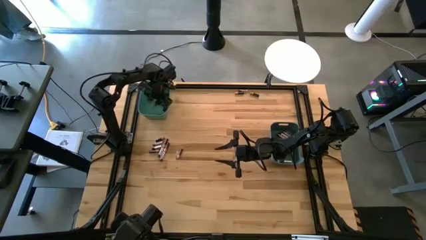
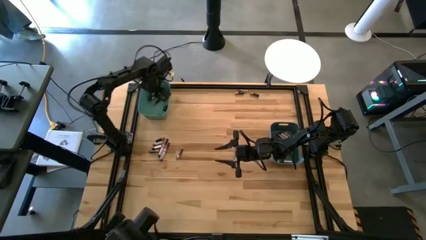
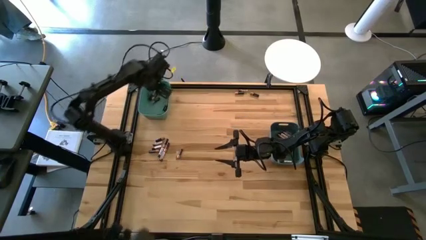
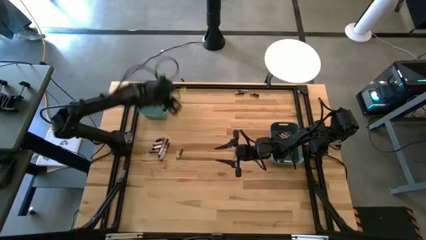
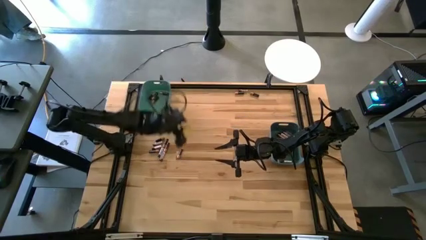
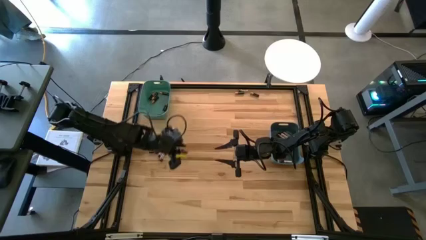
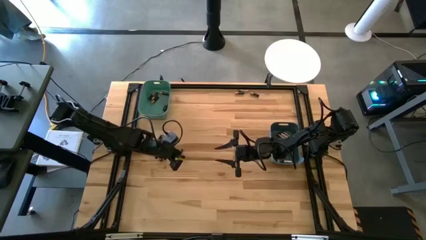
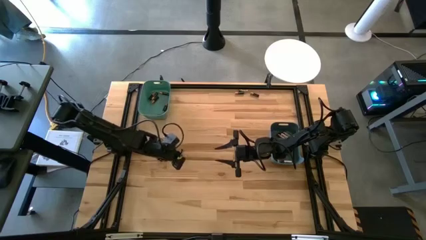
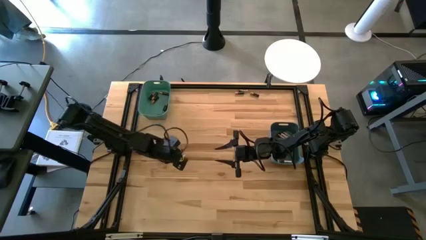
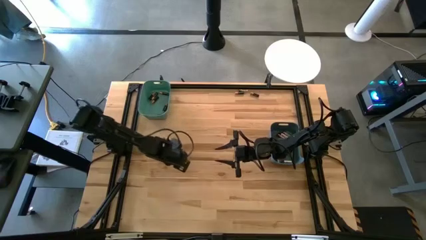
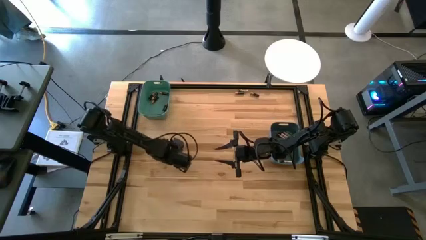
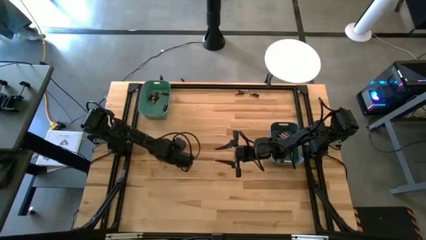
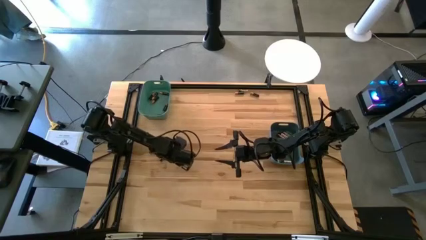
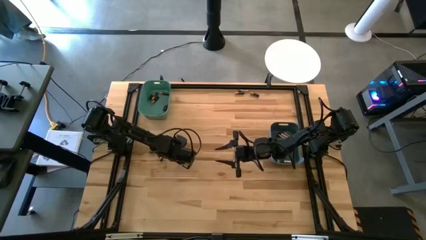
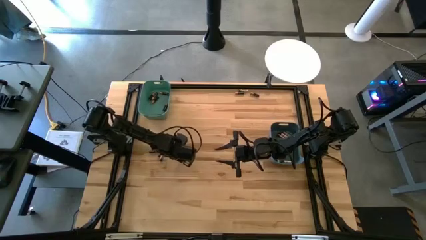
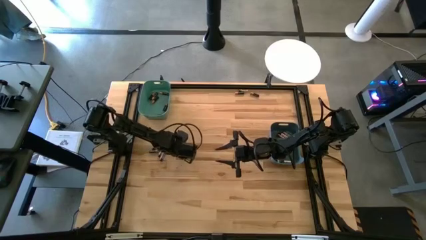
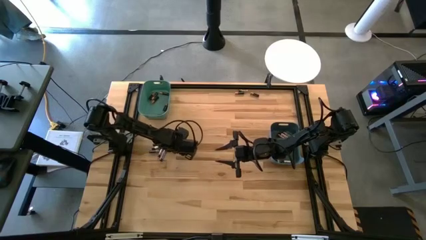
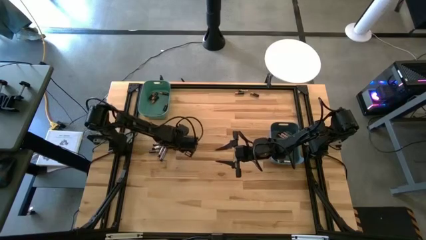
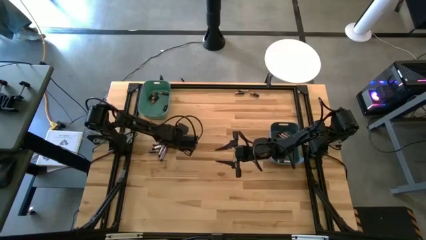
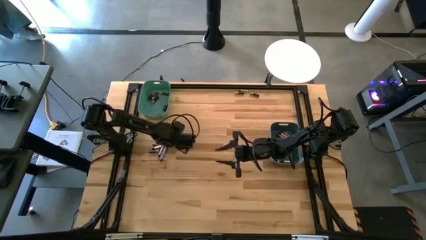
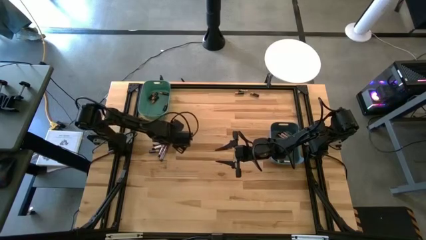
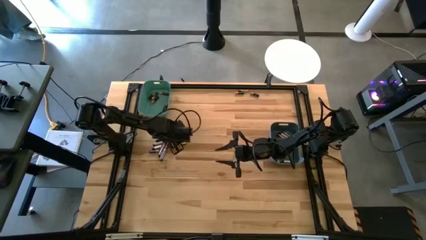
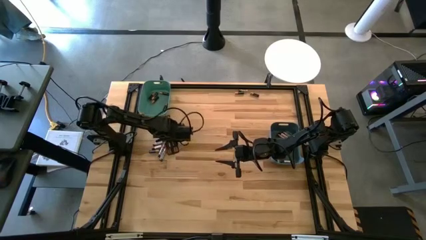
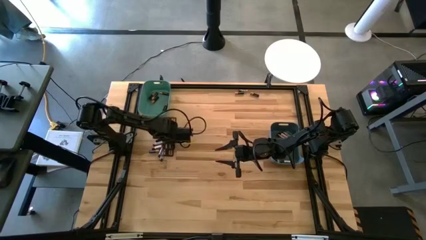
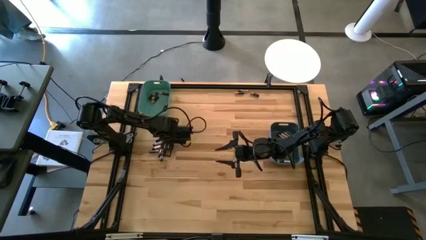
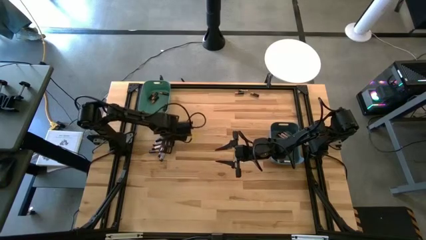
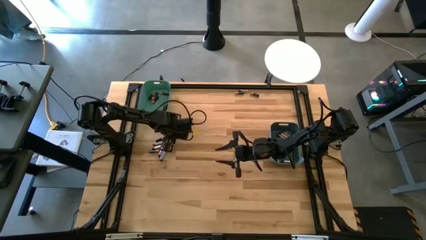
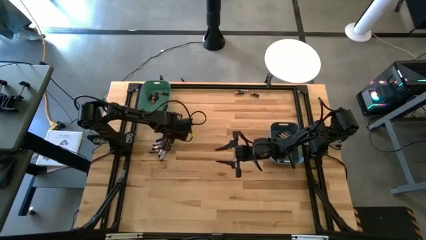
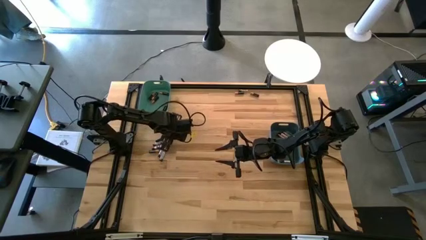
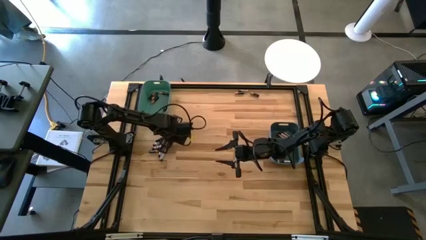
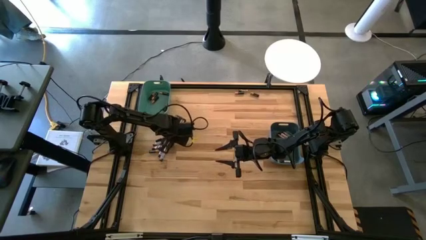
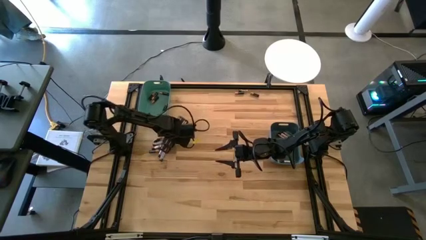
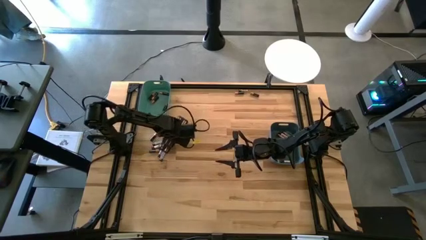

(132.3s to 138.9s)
Task: Sort batteries
Put the black battery into the green bin

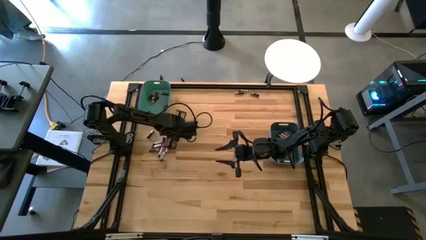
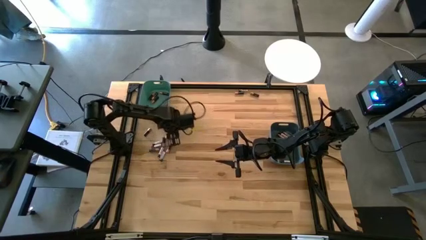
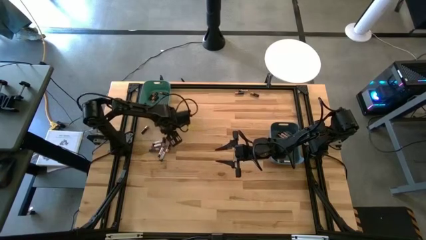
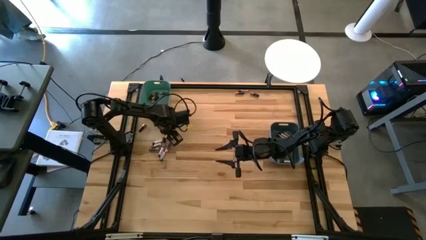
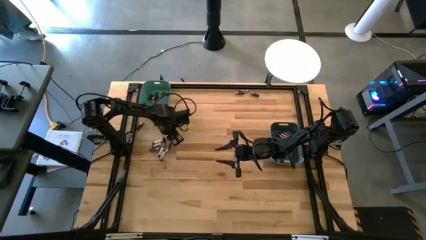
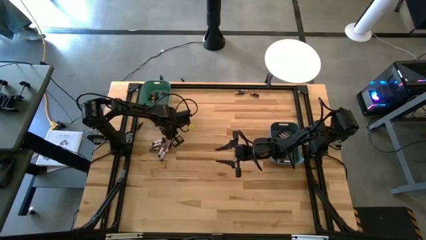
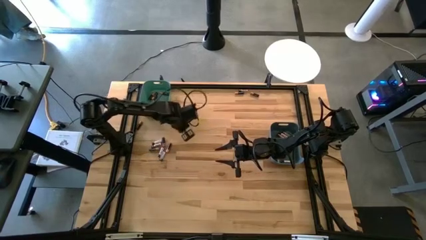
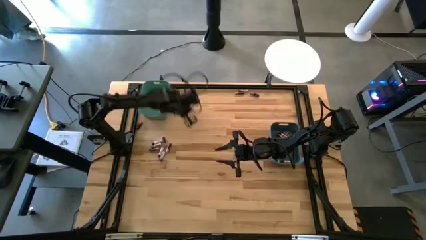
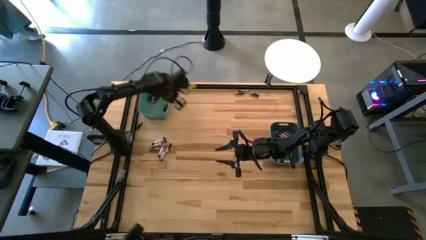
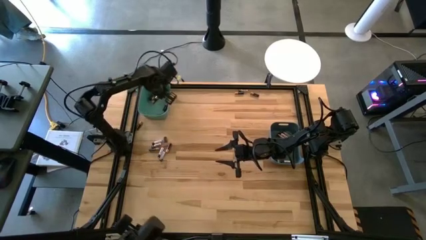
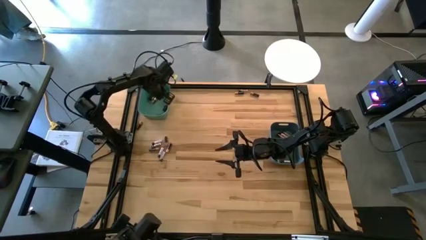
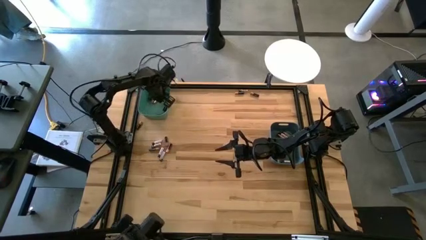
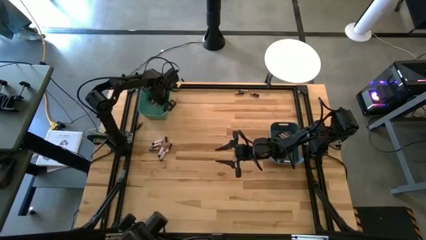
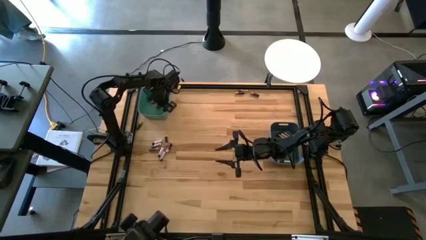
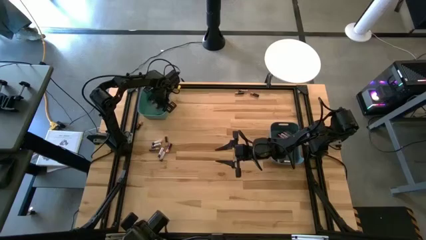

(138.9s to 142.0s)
Put the black battery into the green bin

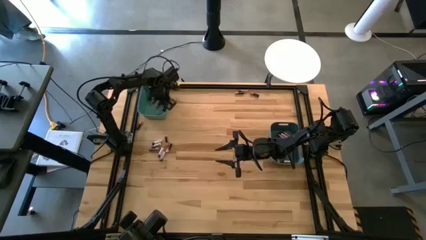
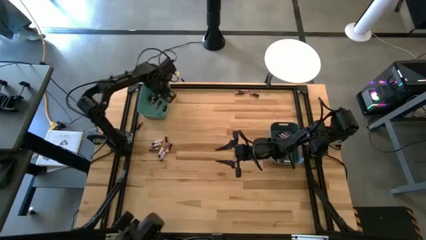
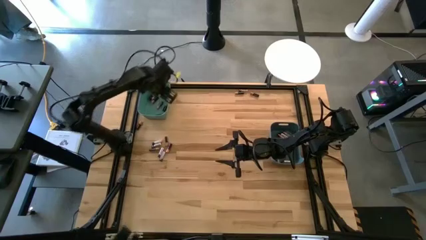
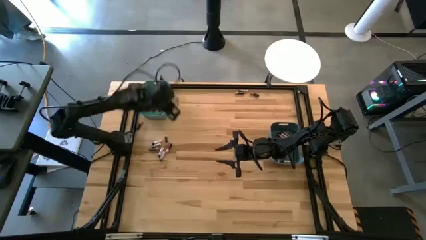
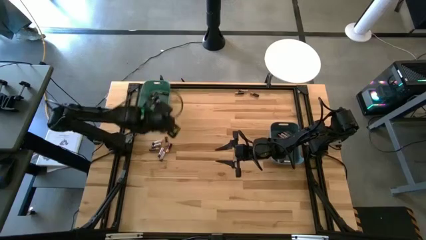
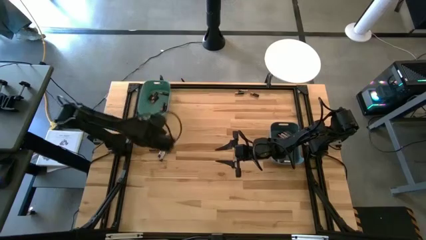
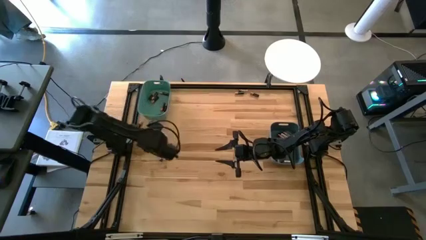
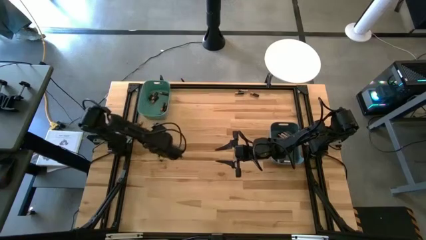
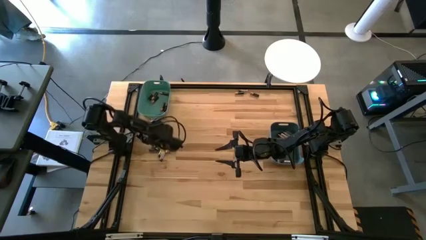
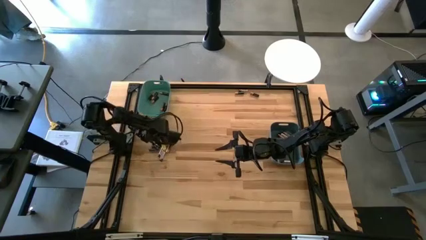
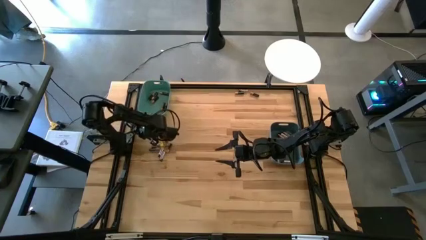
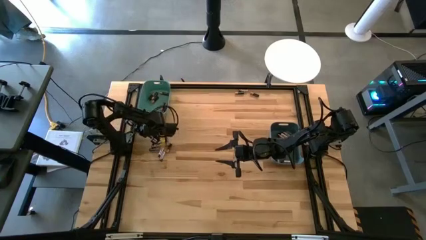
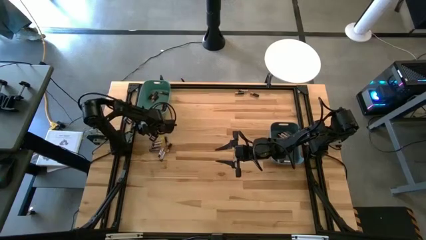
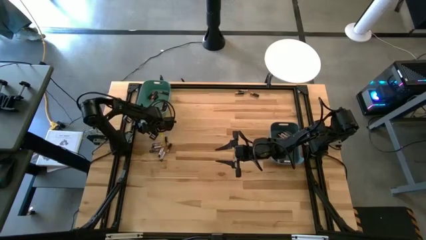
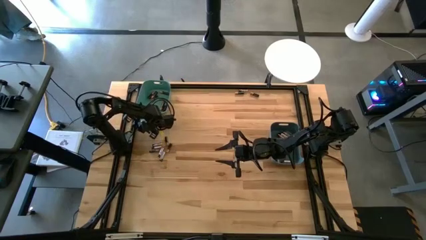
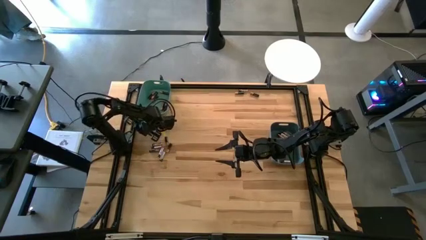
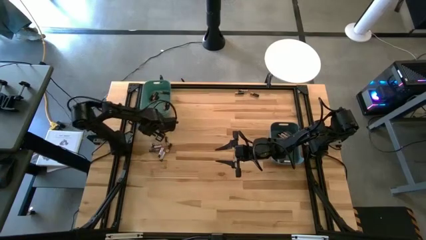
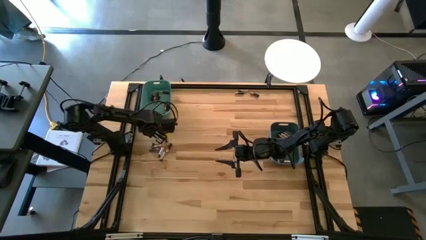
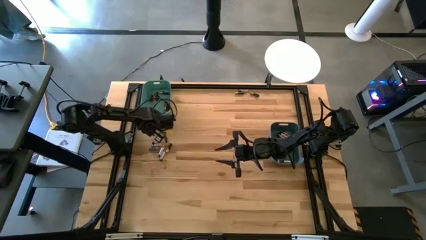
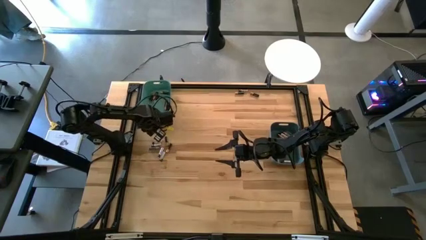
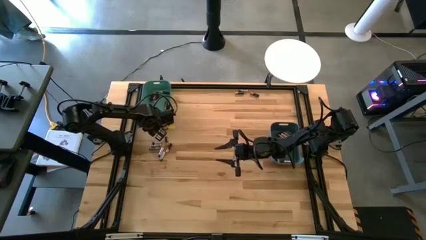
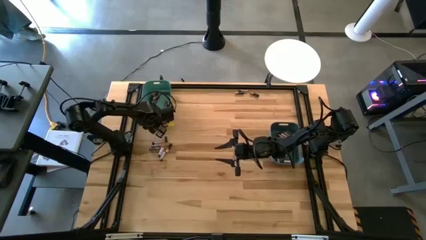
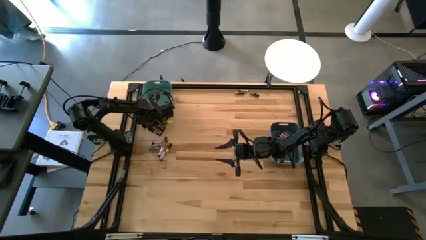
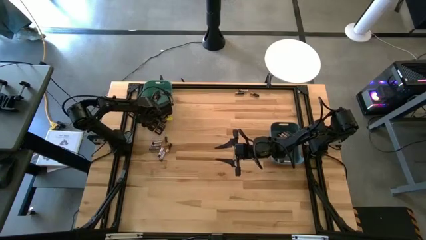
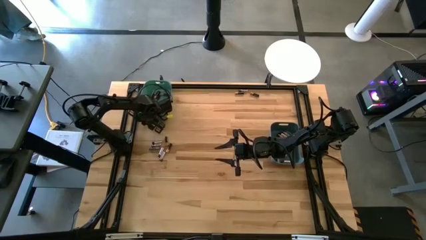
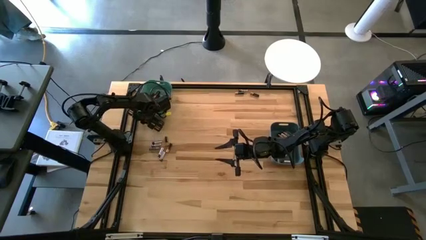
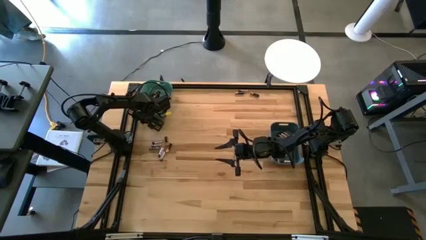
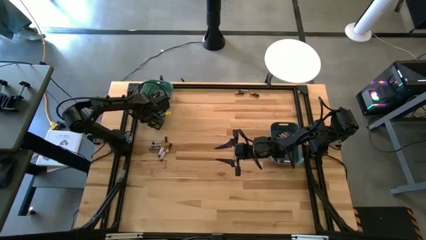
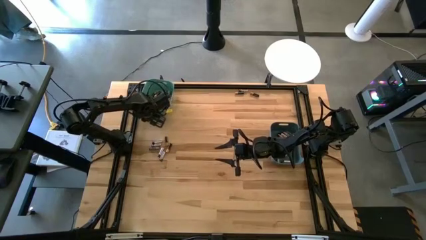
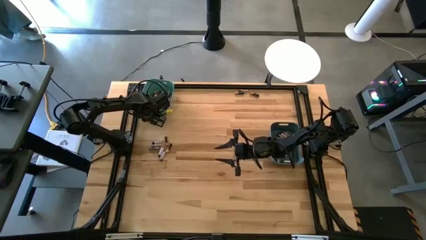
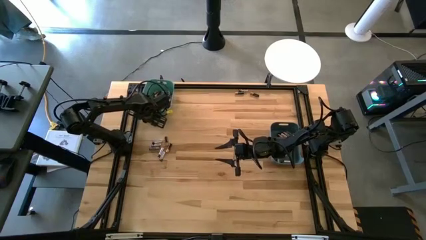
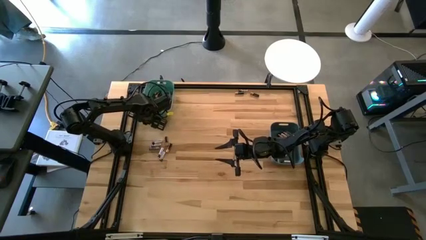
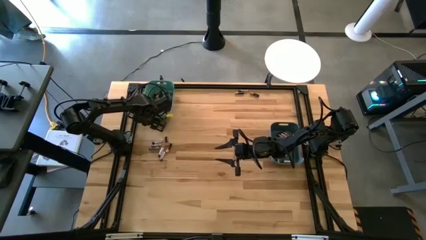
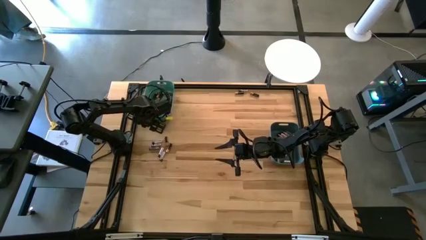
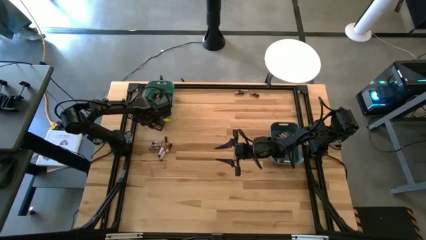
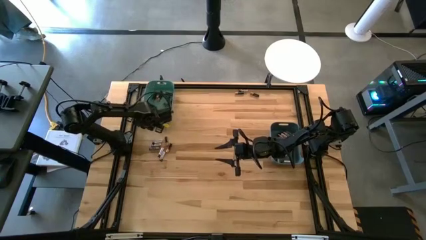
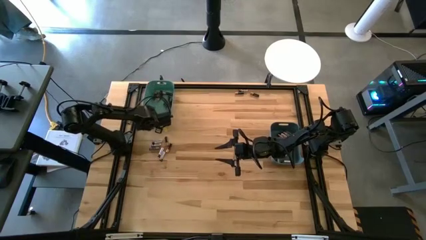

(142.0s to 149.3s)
Put the black battery into the green bin
